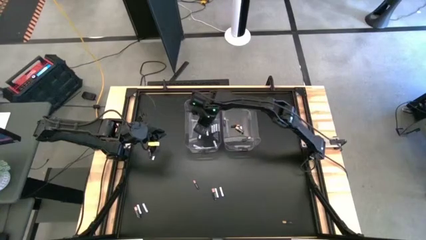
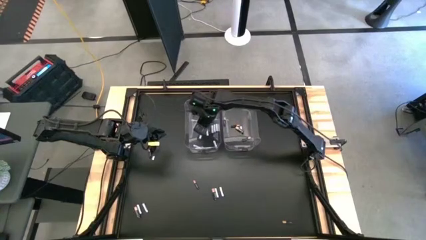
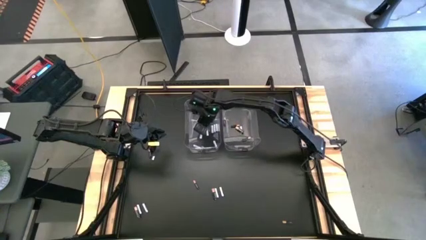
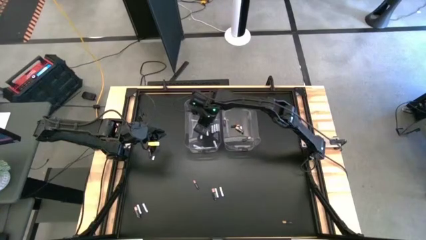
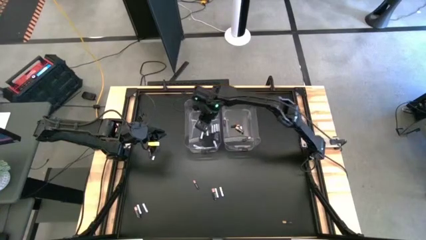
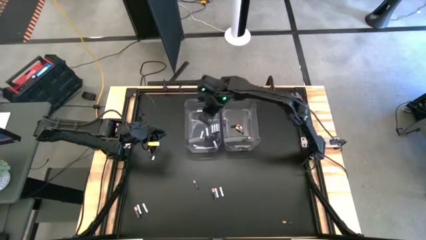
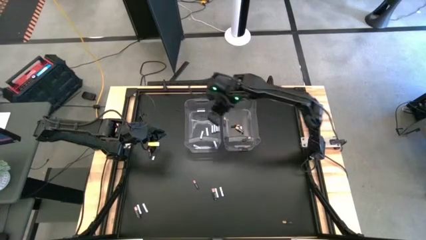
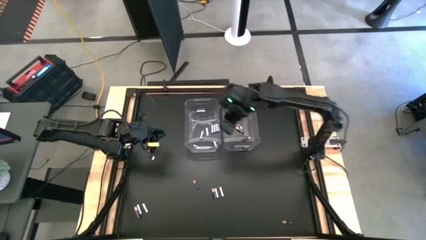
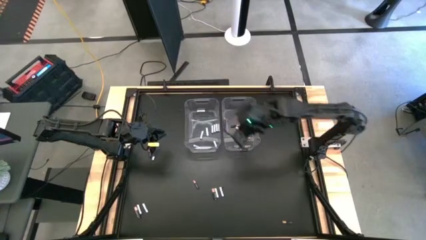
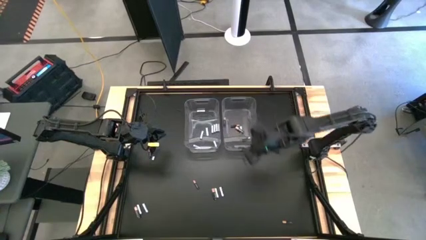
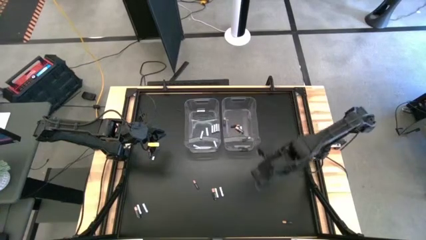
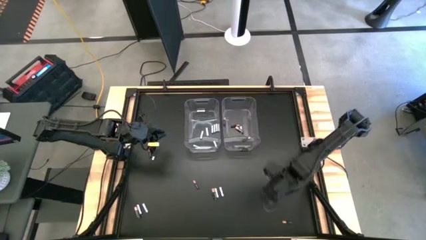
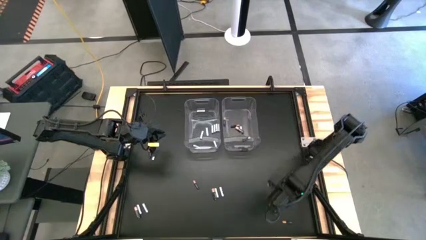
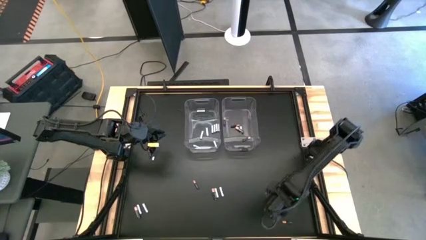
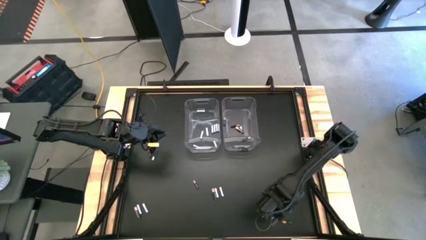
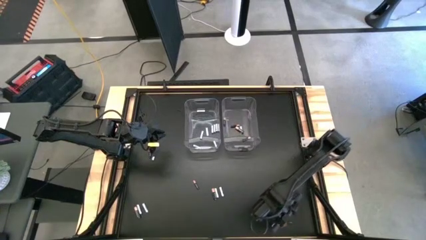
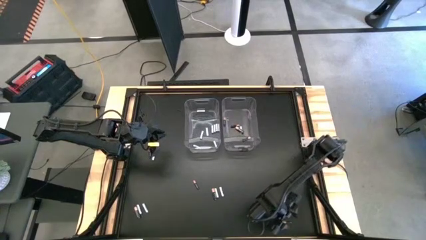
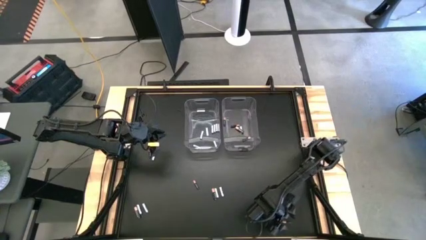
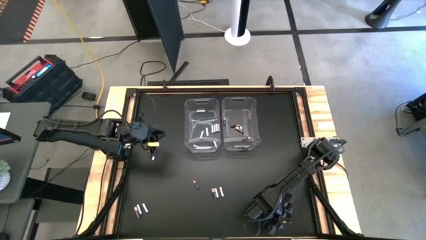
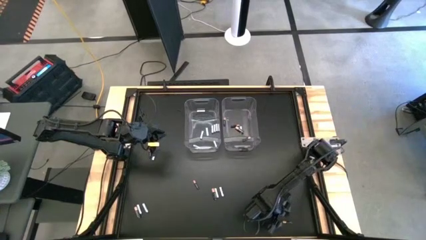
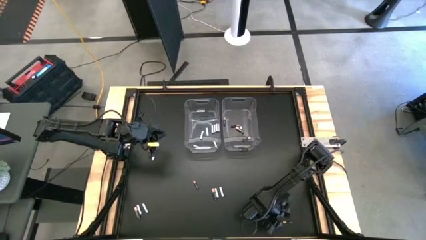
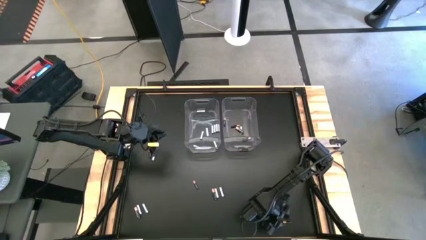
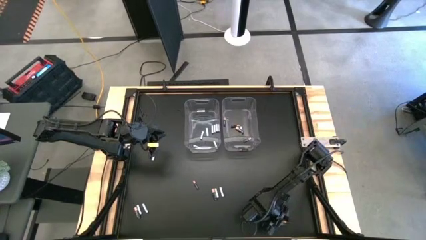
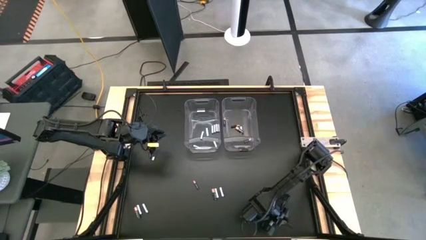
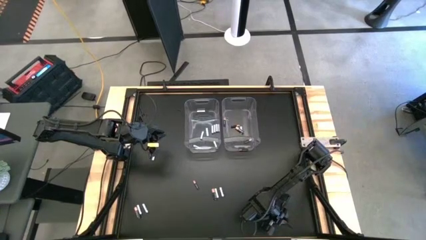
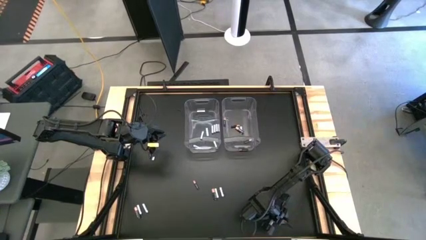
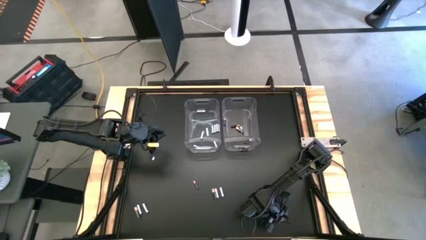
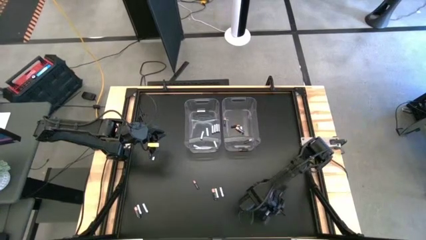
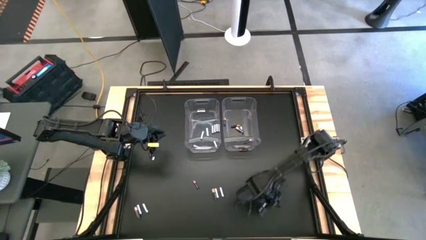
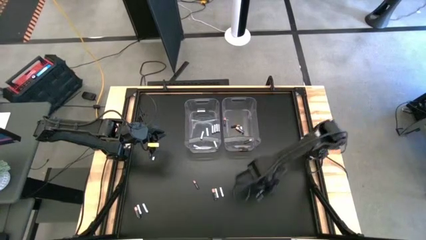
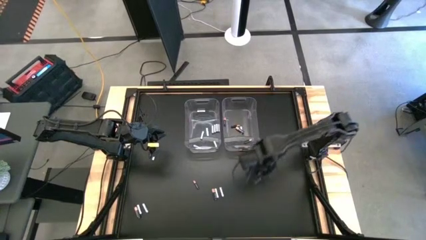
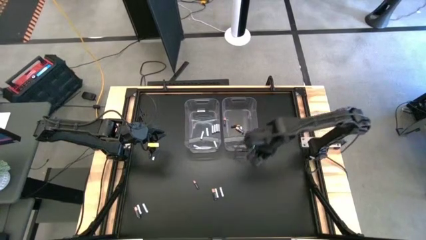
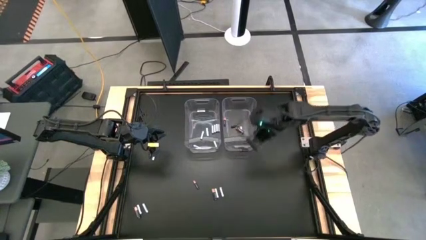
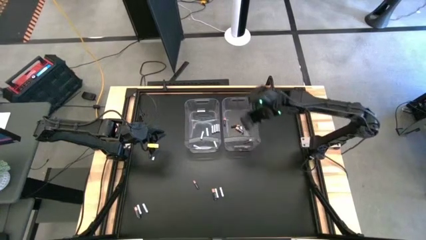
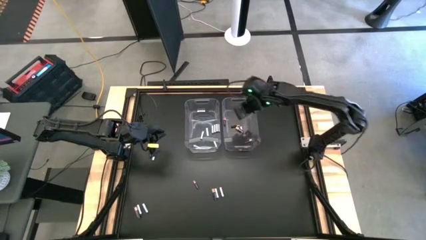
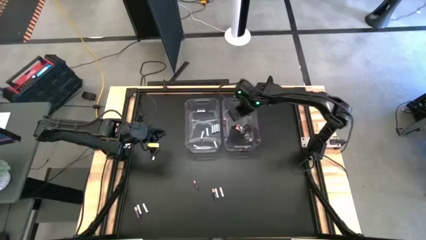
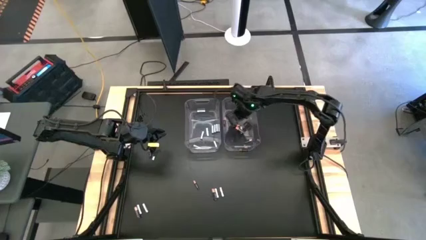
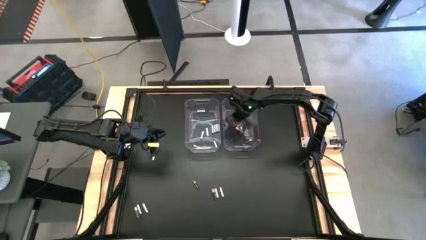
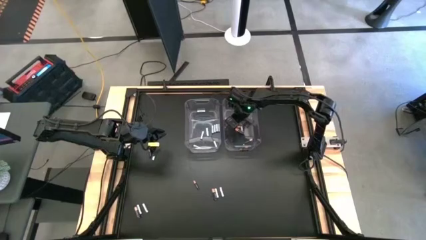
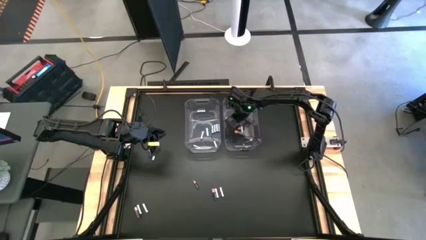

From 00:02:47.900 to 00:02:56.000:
Task: Sort batteries
Put the black battery into the right transparent bin

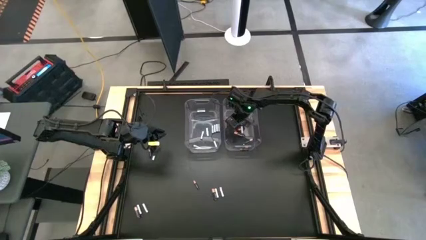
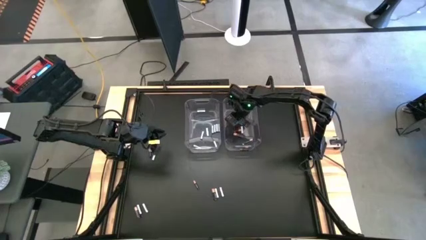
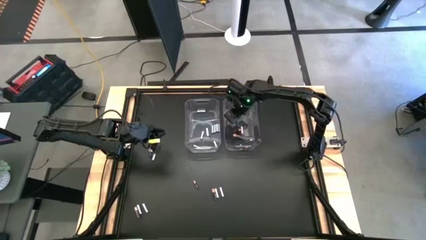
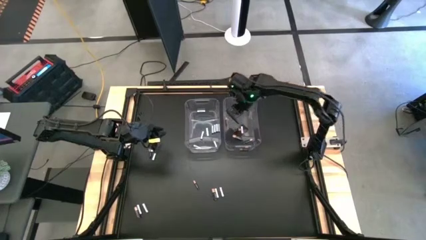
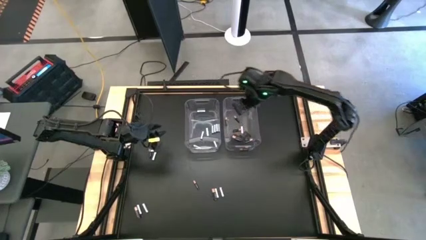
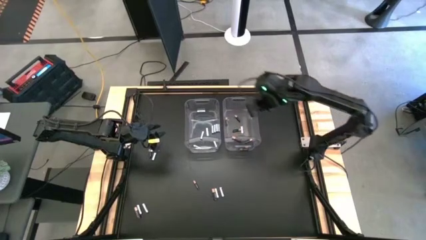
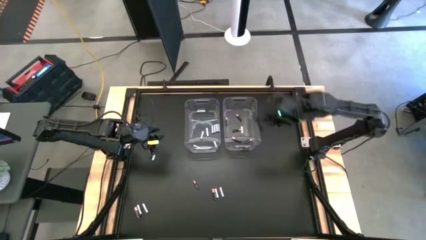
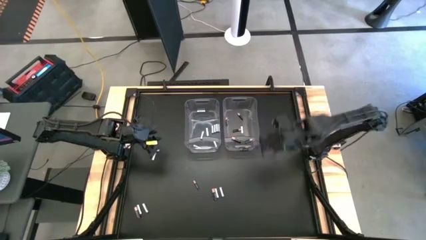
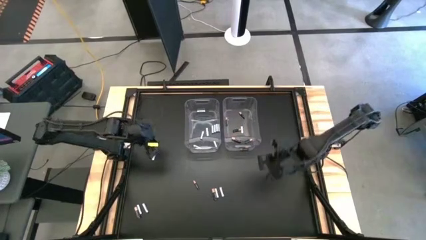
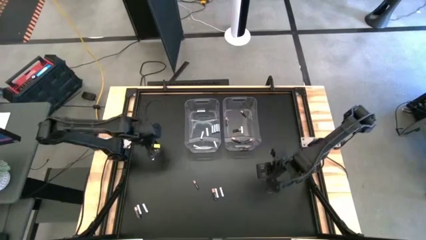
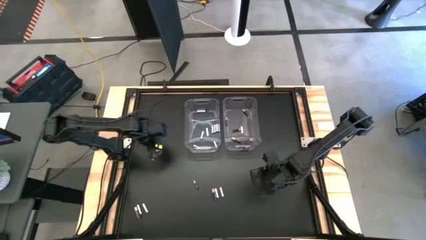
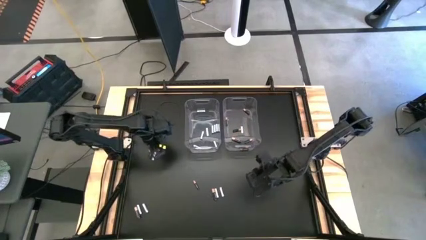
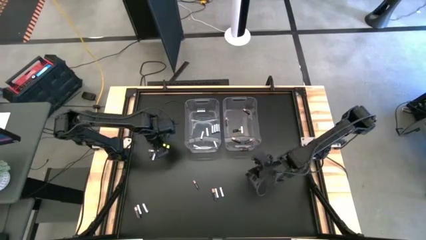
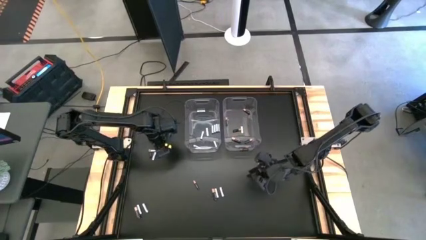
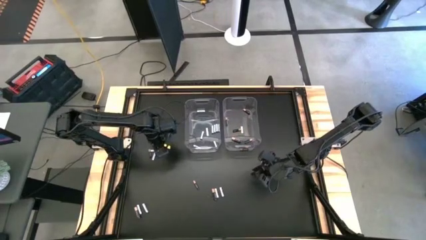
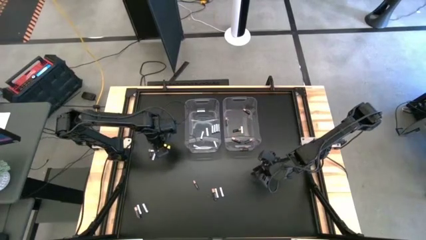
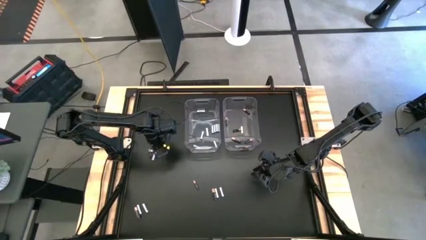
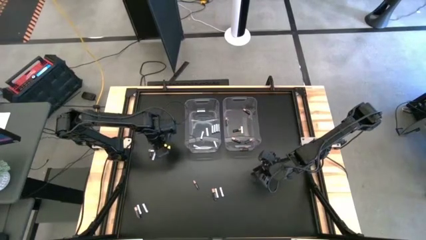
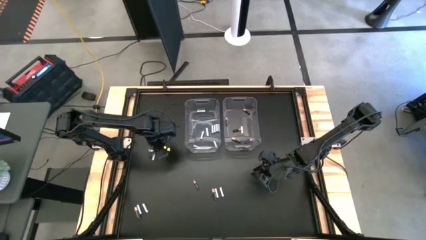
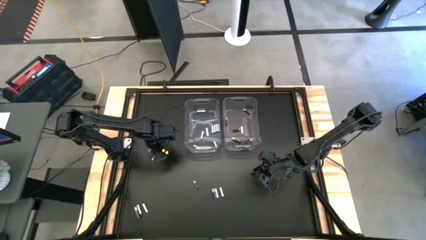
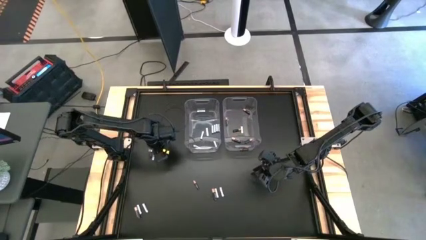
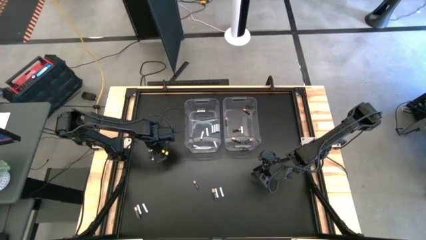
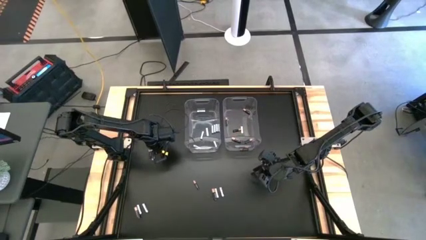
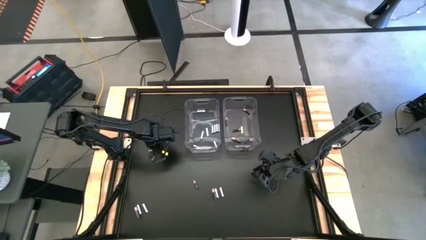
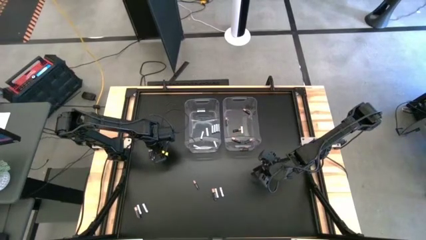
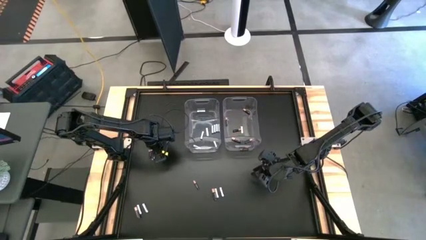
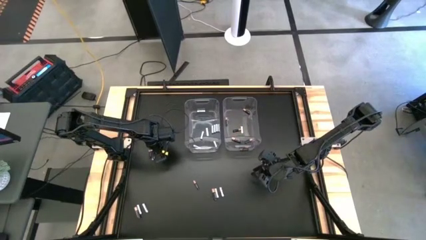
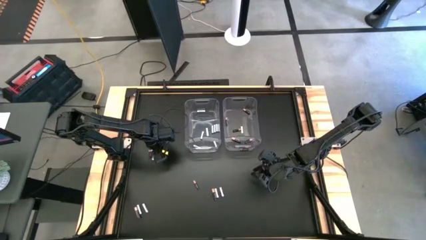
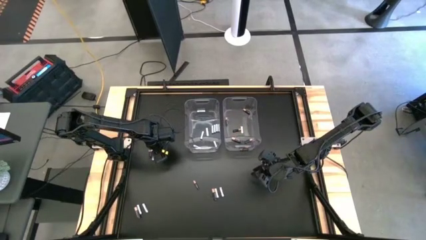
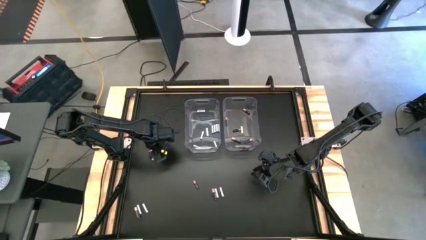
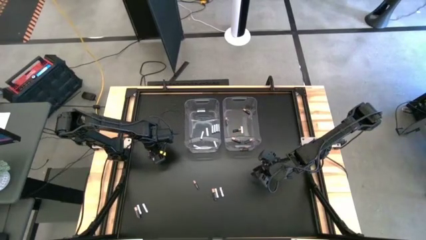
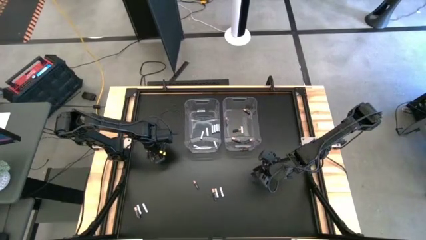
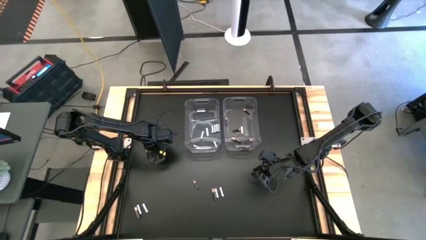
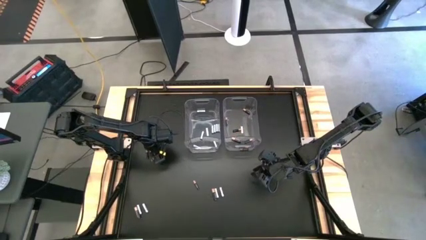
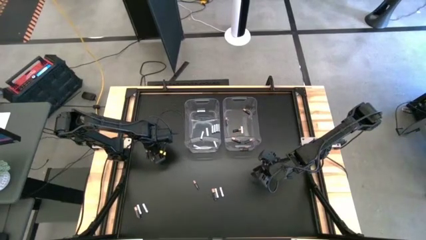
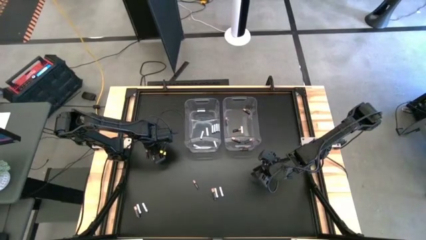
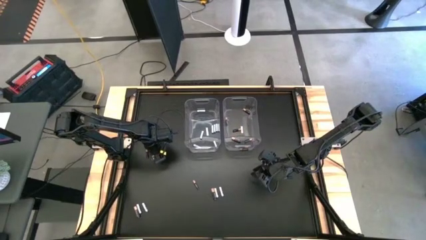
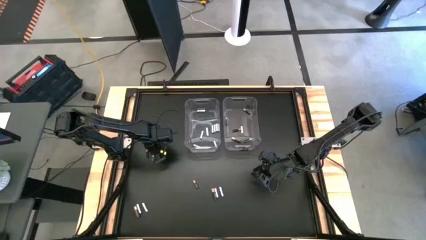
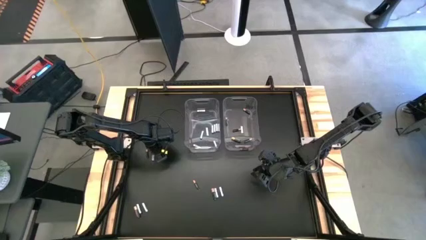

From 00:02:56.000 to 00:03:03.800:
Put the white battery into the left transparent bin

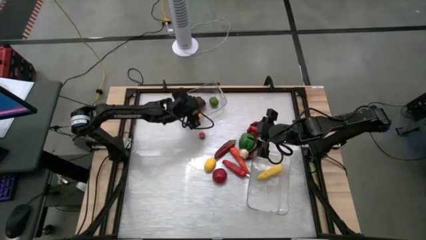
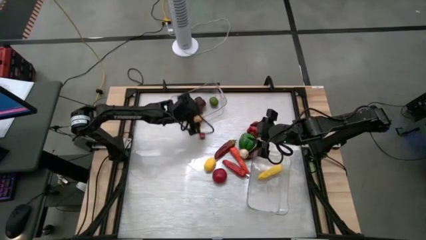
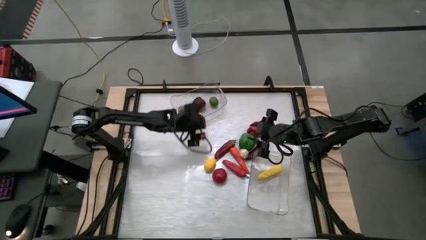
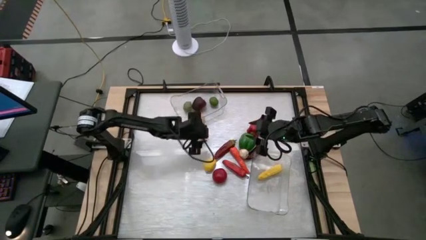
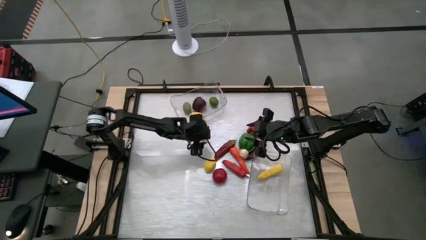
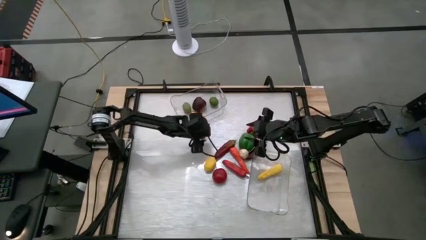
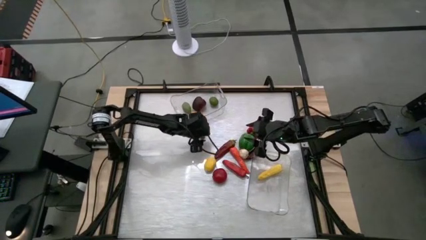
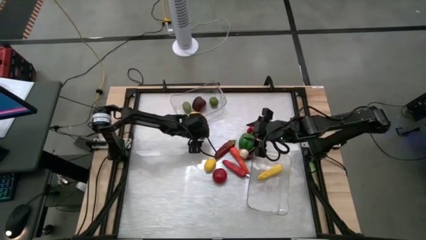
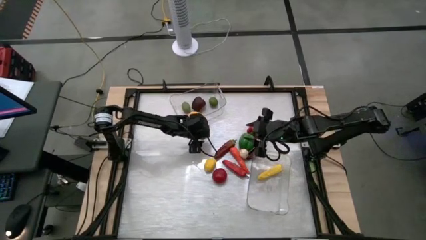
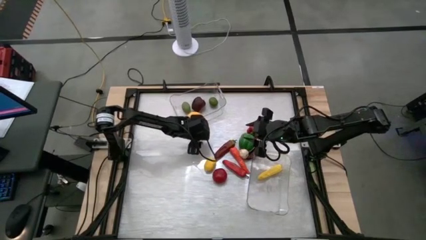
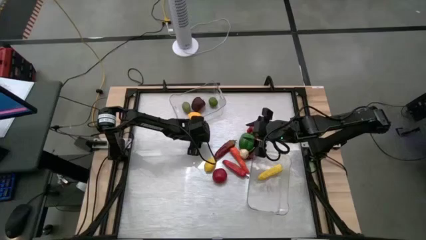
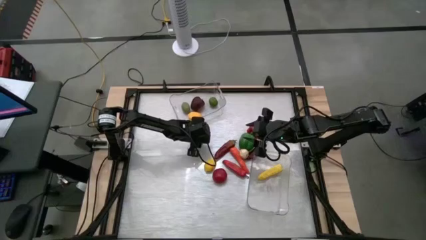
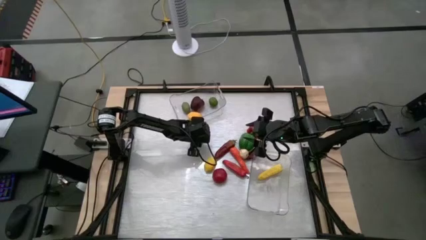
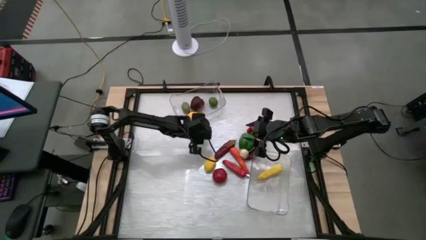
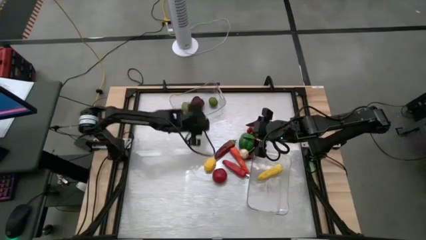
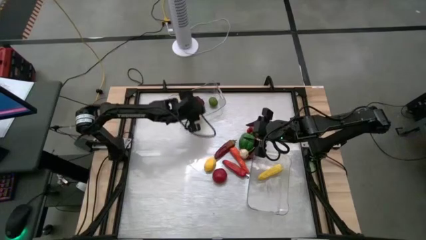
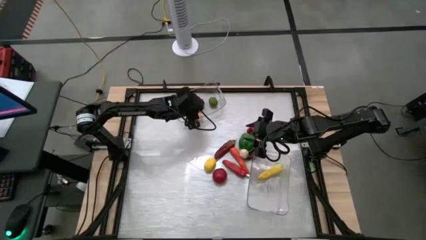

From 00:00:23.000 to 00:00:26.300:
Task: Sort produce into baskets
Put the left red tomato into the top transparent bin
